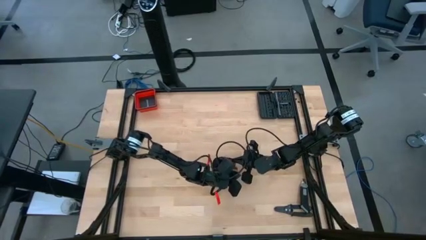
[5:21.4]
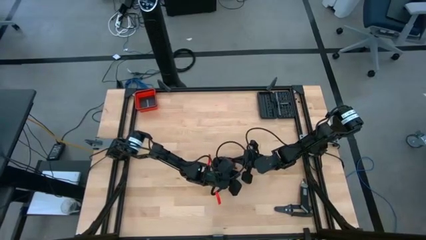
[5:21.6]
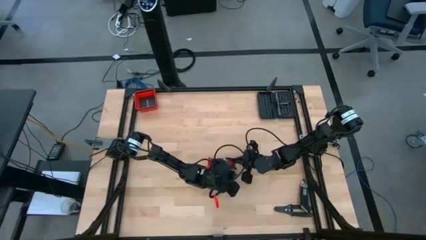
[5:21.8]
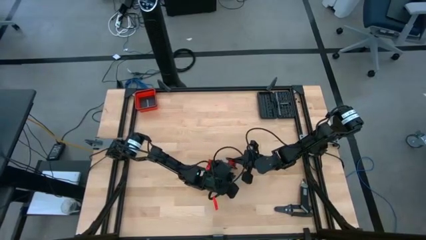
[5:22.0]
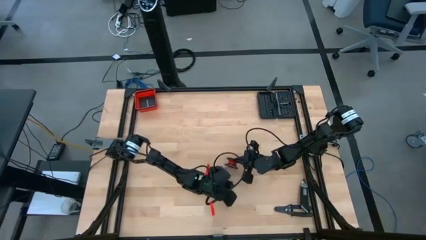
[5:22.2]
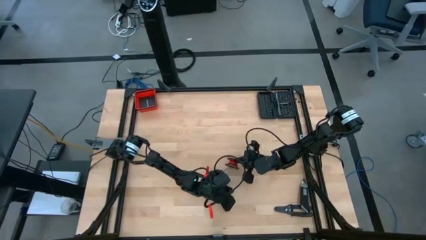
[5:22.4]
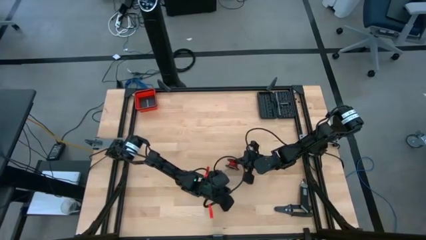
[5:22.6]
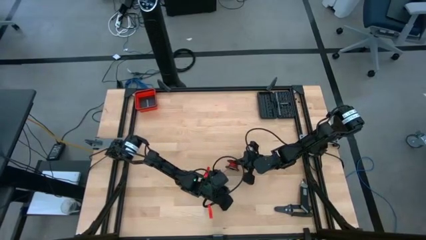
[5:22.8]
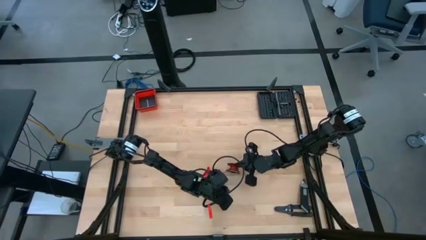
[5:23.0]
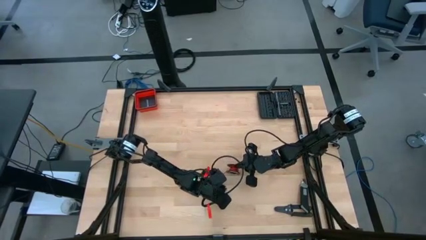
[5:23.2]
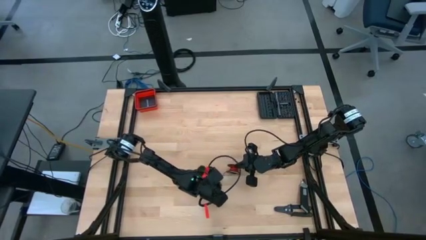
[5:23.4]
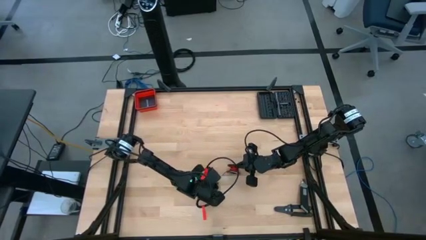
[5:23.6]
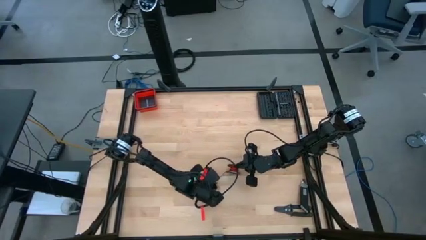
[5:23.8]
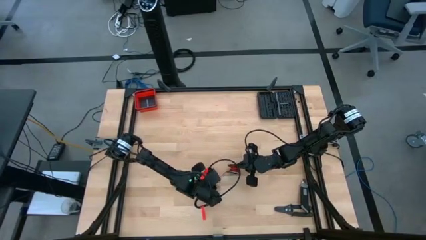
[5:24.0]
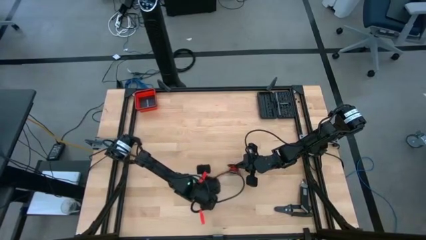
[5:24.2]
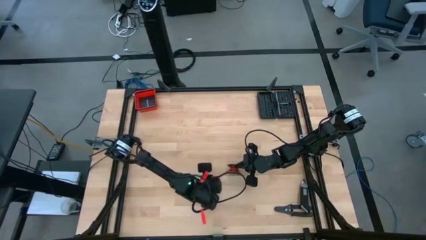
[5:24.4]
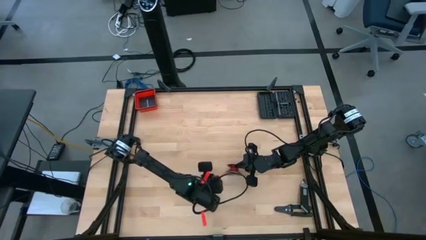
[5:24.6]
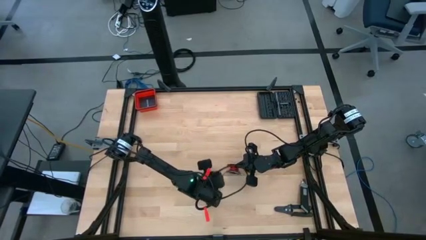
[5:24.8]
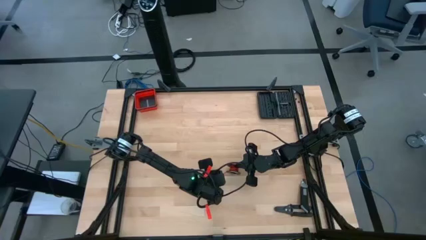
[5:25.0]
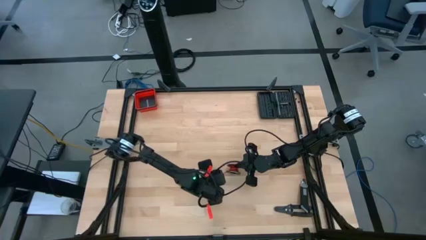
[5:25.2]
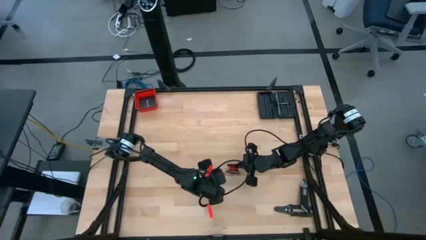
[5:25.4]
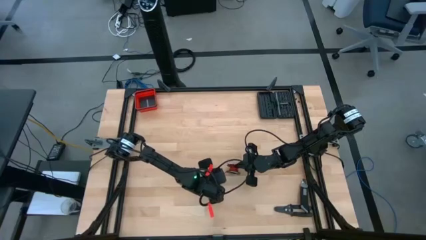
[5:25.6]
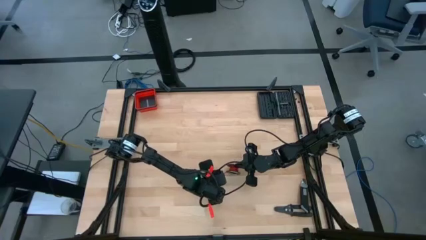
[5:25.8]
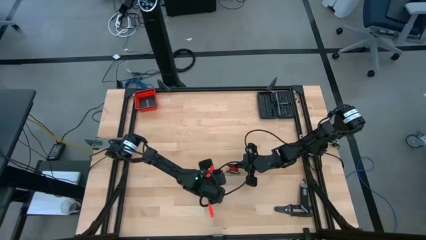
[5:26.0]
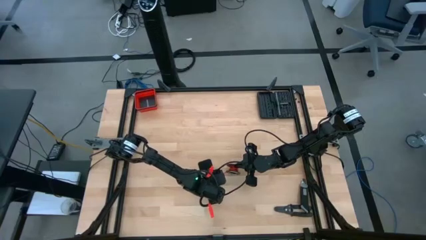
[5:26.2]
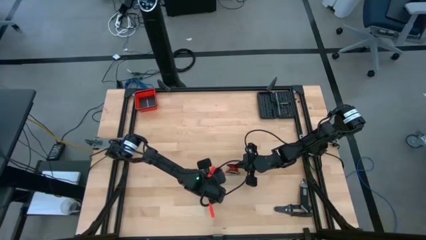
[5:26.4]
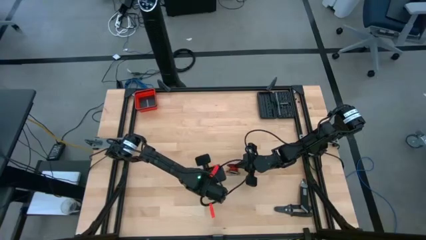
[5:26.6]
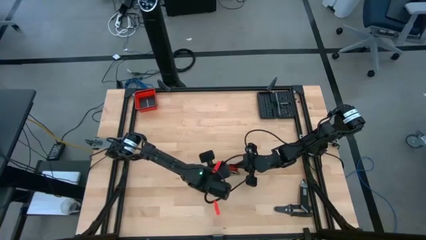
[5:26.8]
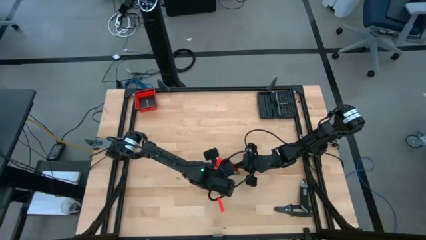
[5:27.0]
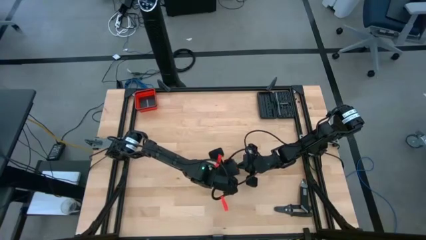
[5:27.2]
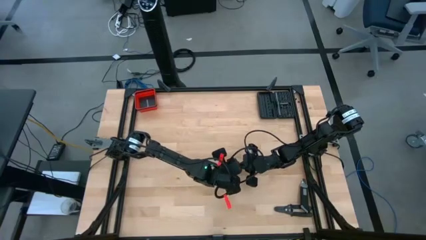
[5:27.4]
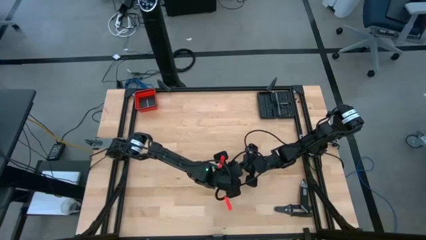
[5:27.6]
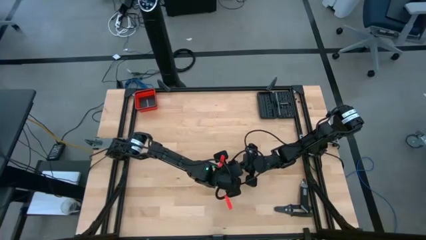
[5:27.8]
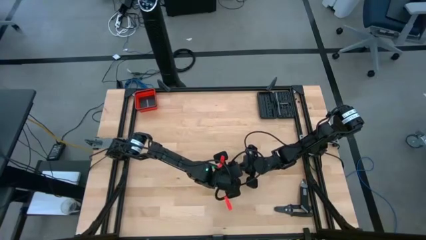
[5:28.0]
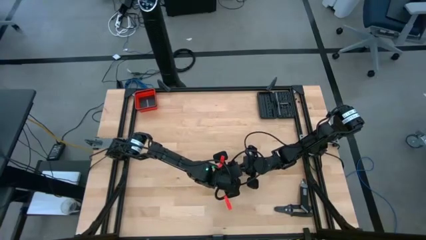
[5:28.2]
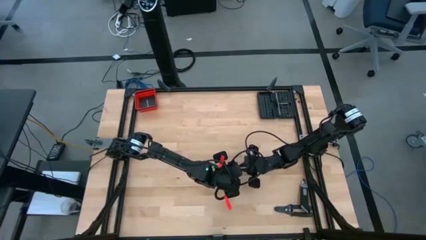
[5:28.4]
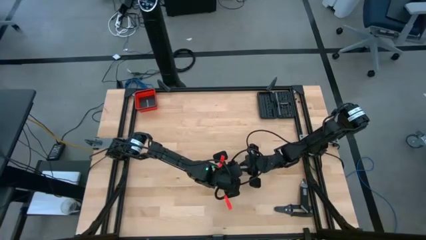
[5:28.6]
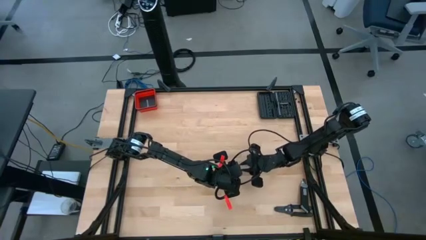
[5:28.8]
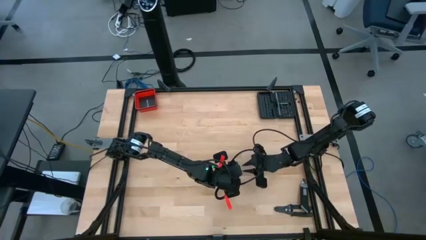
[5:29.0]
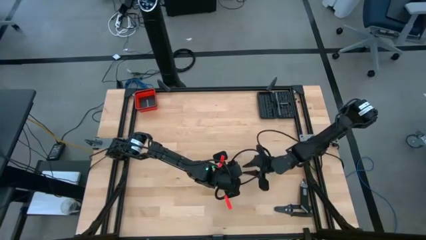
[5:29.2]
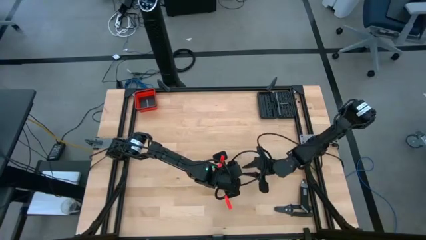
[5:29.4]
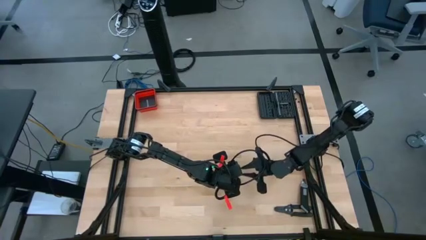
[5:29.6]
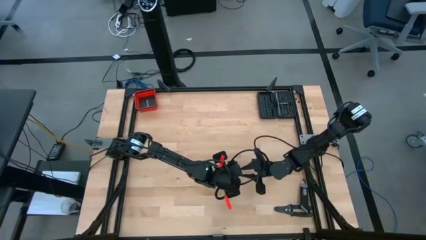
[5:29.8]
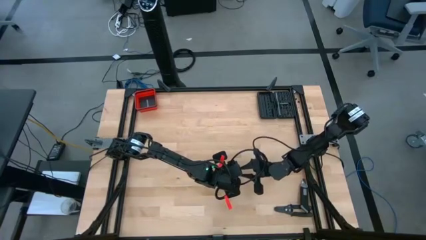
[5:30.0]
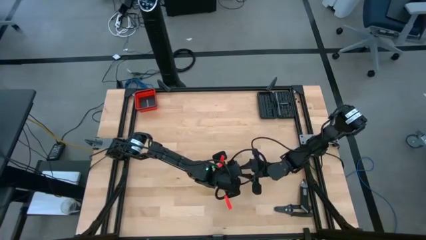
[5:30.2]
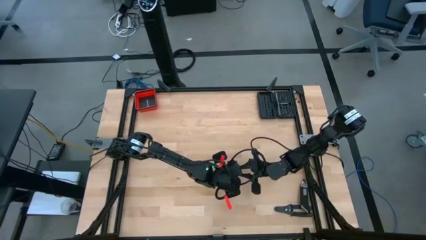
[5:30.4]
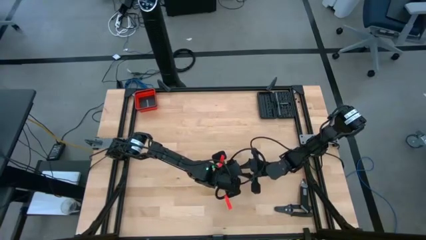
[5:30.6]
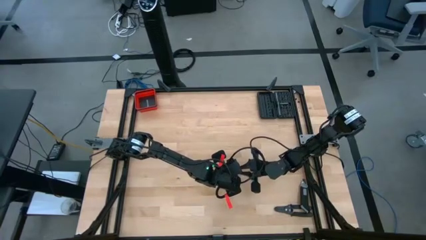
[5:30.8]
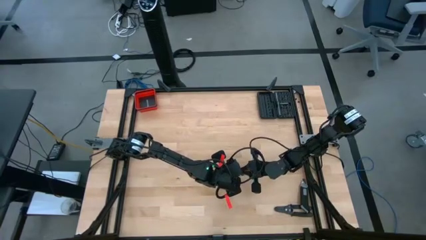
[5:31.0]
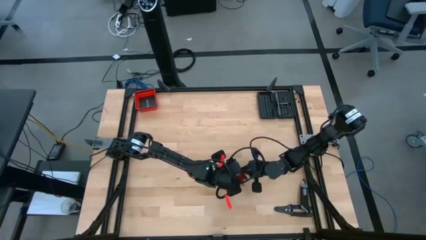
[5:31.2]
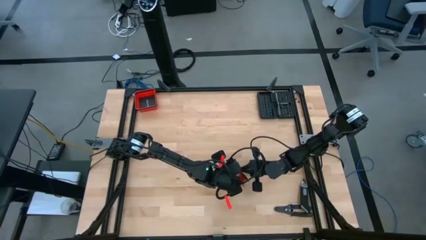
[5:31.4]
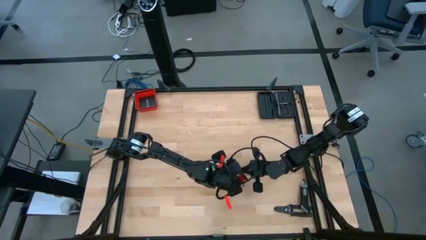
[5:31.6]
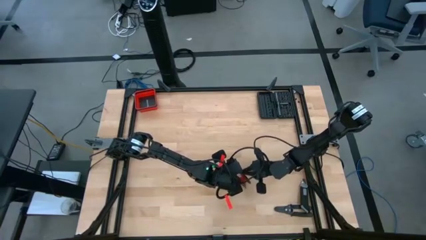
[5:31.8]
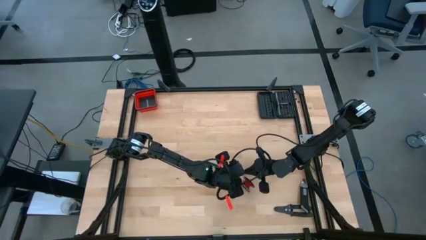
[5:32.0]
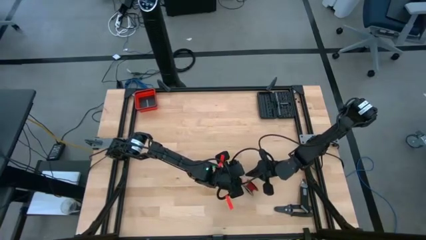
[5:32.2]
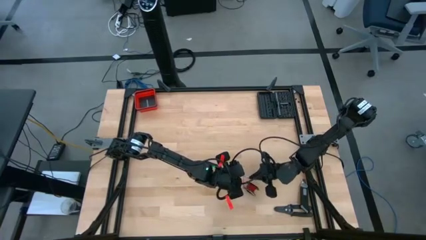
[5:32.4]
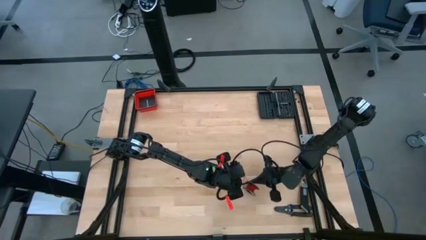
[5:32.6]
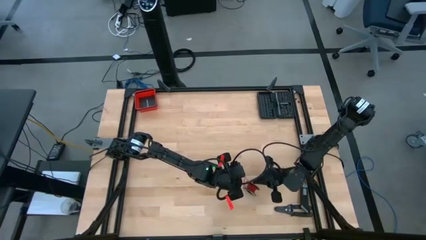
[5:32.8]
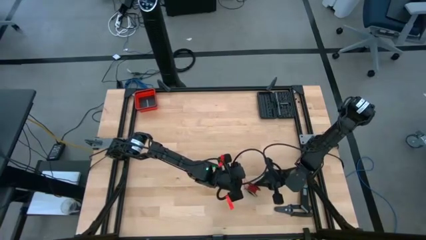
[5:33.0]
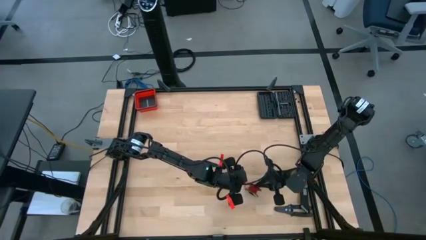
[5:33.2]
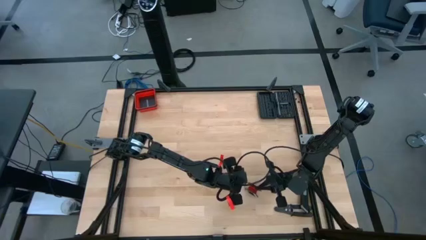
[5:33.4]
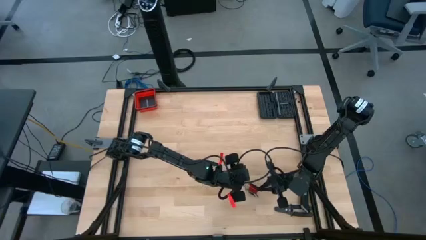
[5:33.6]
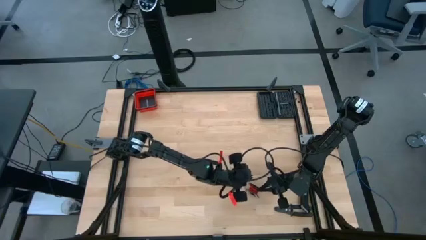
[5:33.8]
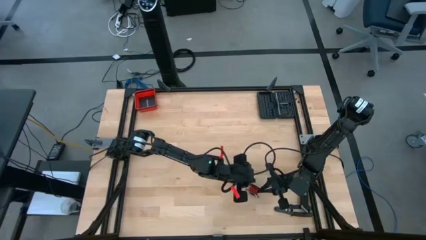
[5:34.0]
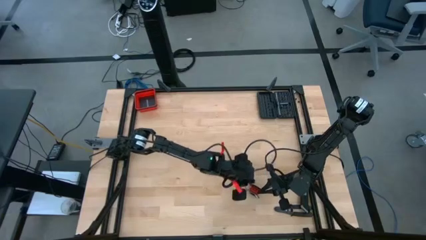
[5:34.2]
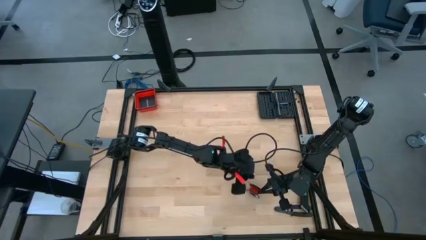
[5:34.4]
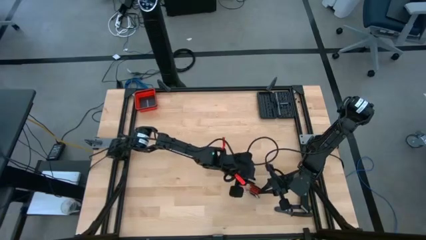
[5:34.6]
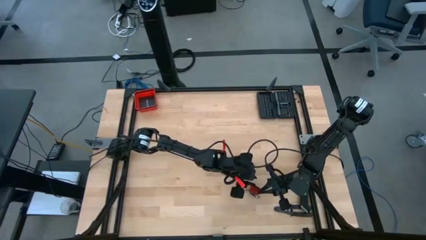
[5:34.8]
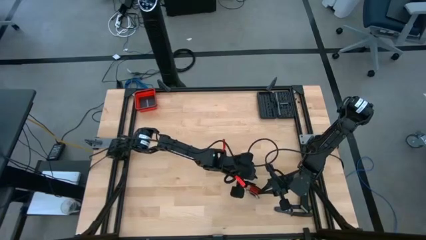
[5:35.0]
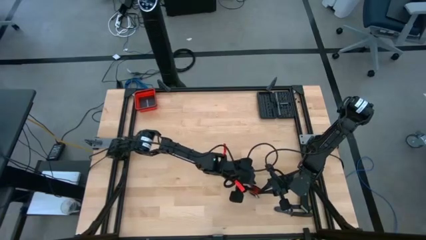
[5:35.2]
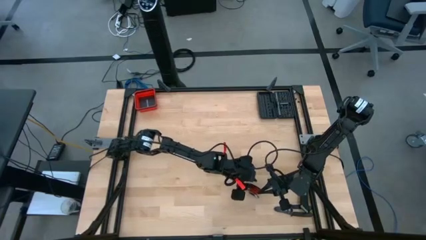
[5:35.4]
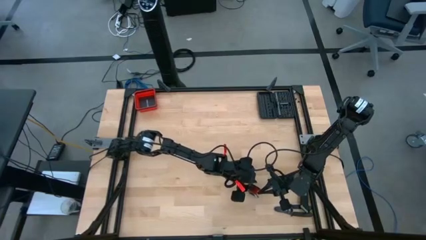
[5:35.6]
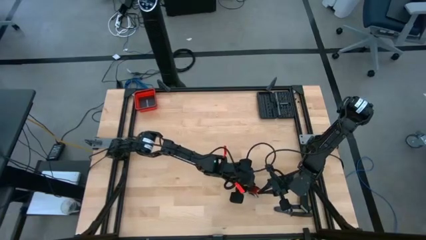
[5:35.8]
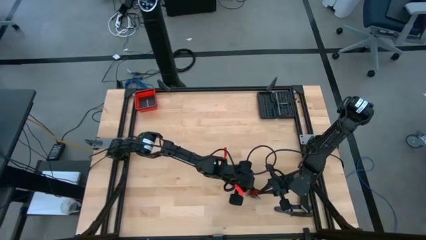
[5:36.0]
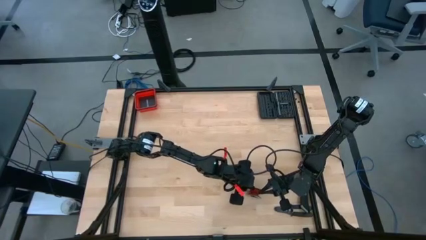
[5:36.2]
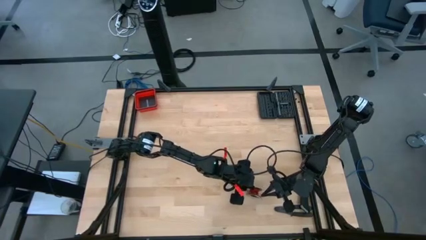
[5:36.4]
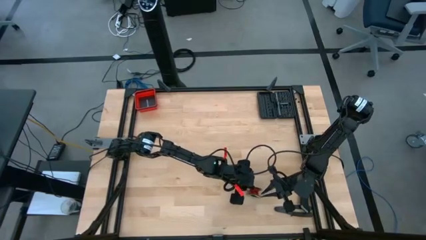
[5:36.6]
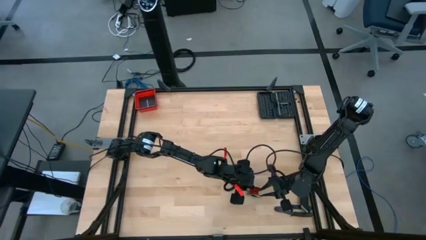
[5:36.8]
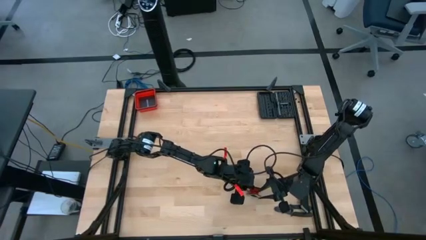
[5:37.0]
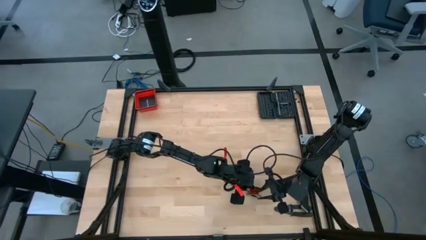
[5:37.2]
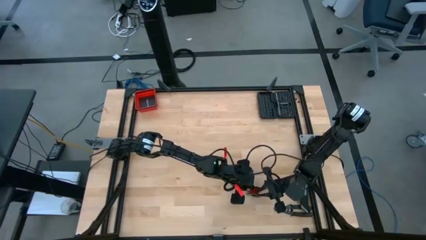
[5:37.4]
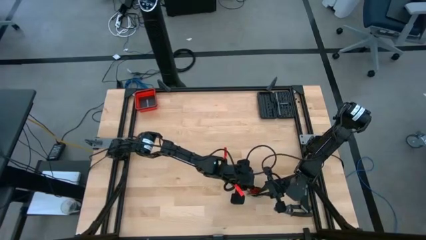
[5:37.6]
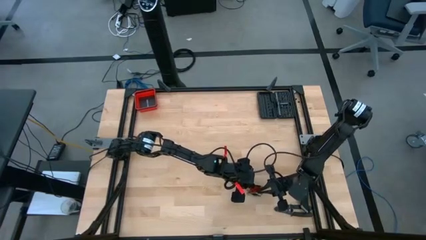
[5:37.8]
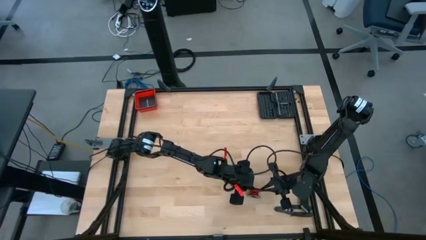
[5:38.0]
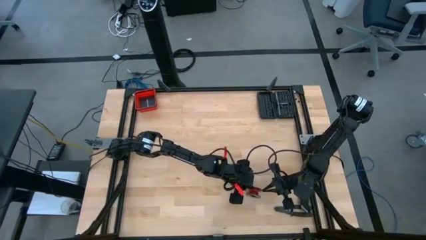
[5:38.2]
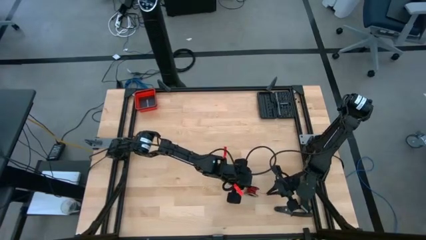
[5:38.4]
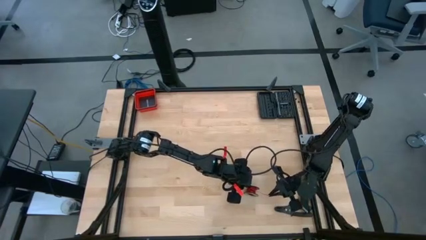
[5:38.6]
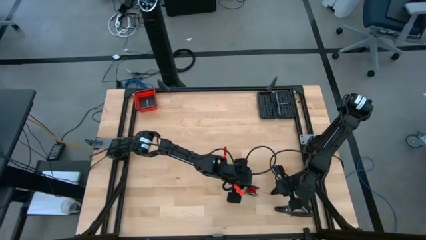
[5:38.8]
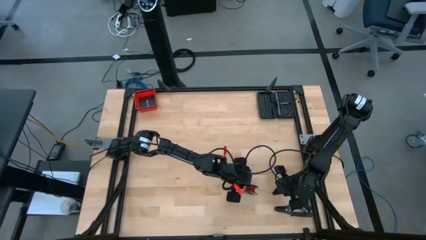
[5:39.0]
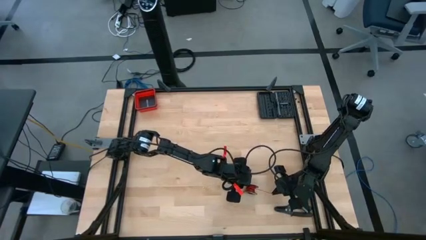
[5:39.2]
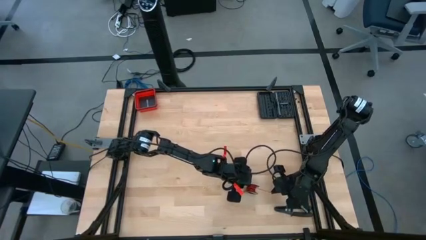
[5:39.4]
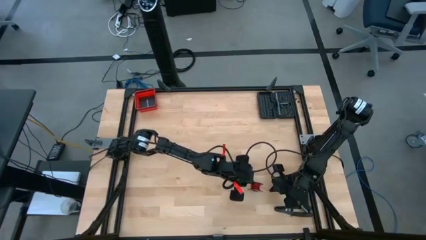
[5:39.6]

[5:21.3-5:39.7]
Task: Coil cords
Coil the red wire onto the spool
